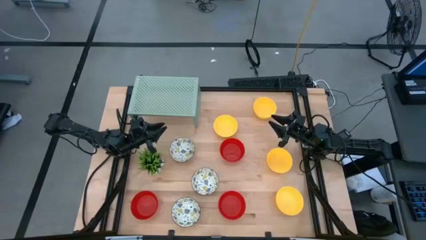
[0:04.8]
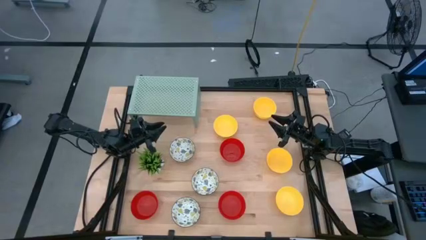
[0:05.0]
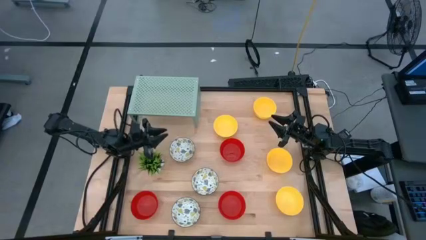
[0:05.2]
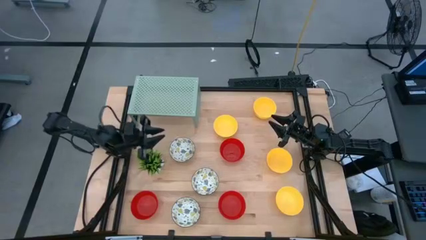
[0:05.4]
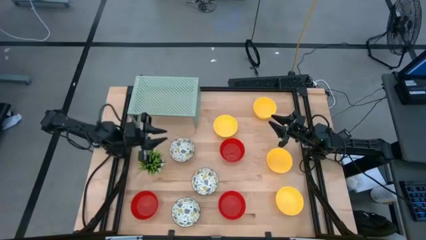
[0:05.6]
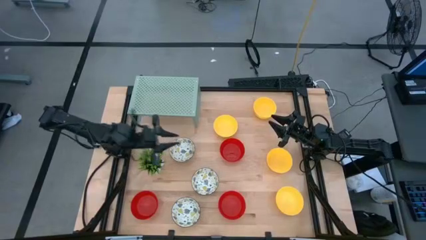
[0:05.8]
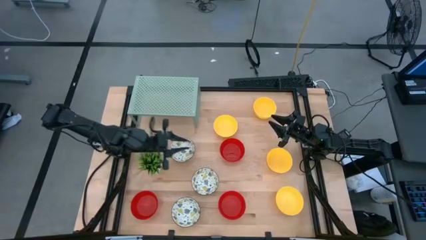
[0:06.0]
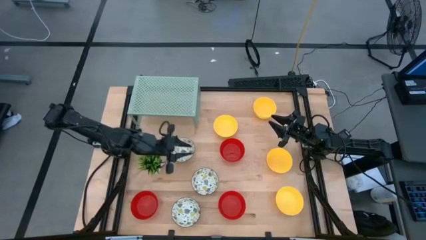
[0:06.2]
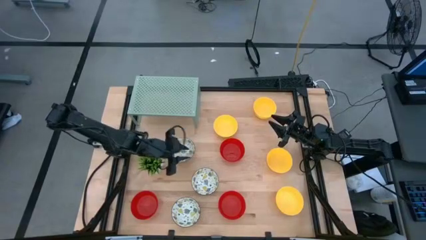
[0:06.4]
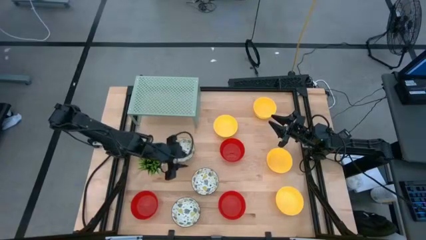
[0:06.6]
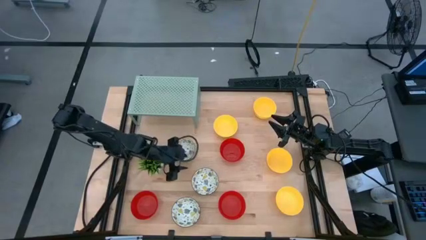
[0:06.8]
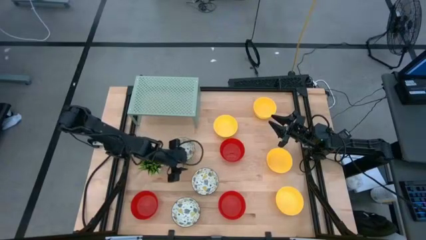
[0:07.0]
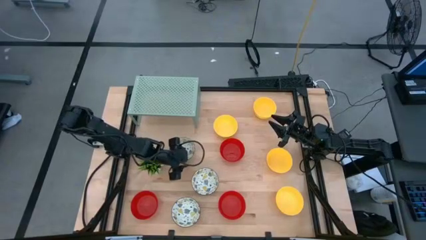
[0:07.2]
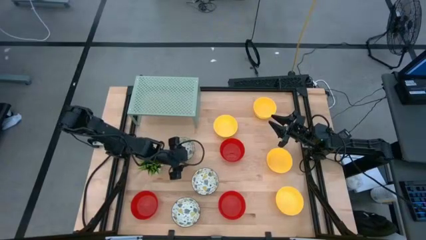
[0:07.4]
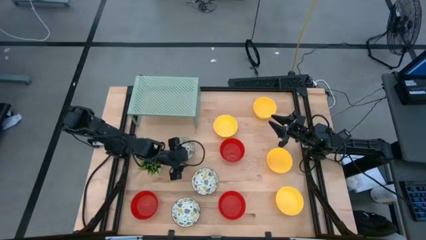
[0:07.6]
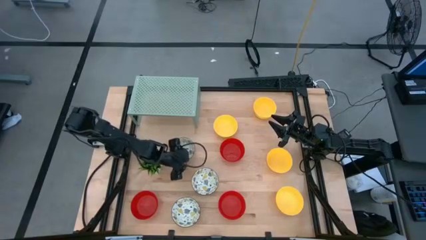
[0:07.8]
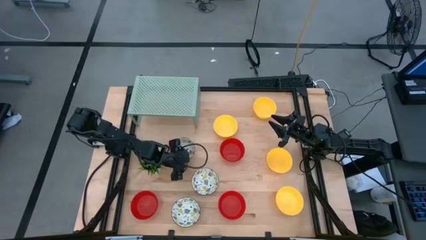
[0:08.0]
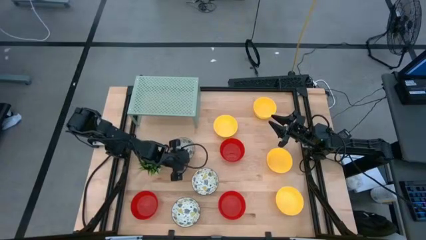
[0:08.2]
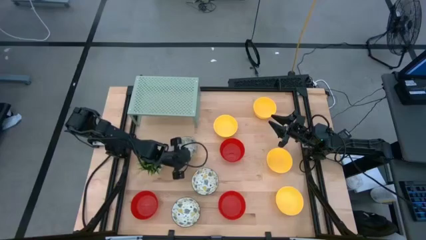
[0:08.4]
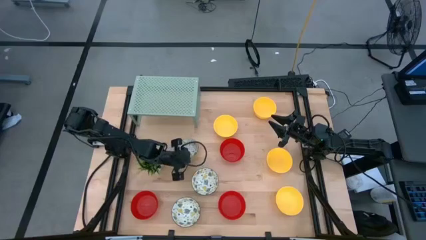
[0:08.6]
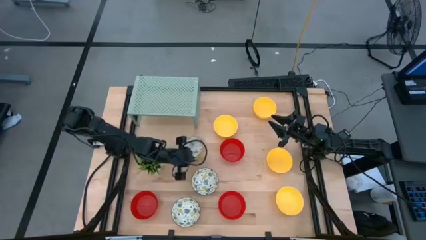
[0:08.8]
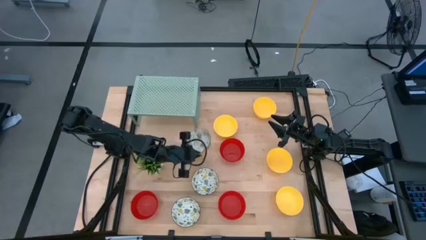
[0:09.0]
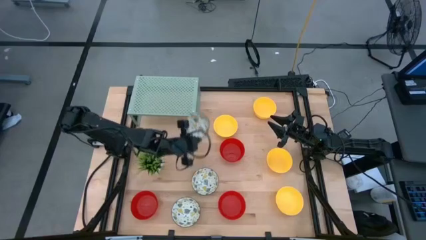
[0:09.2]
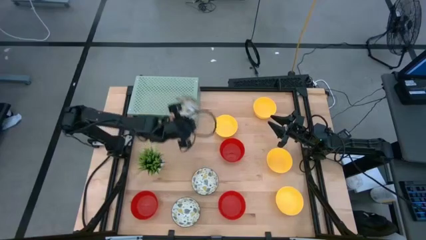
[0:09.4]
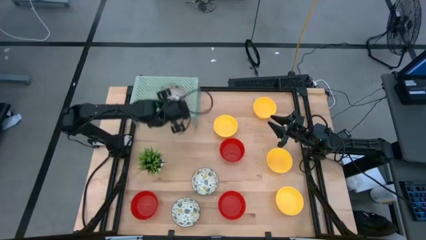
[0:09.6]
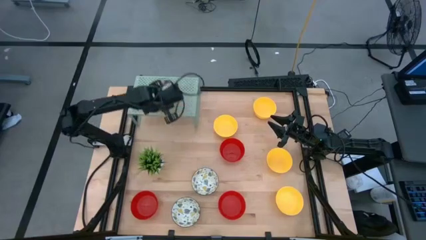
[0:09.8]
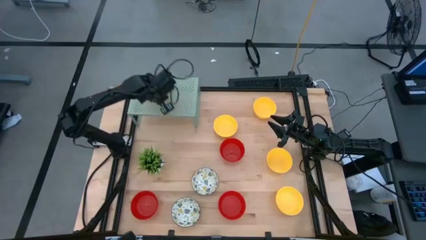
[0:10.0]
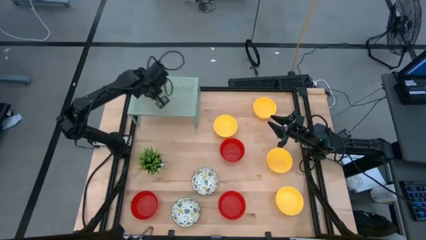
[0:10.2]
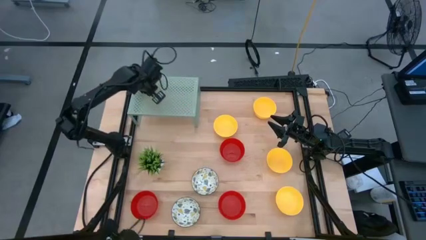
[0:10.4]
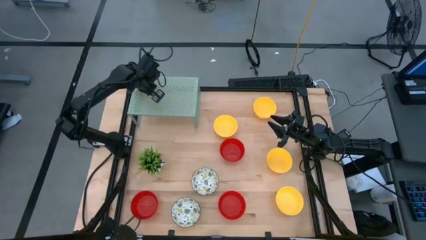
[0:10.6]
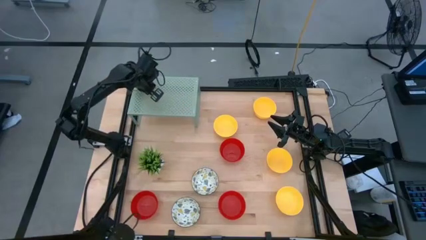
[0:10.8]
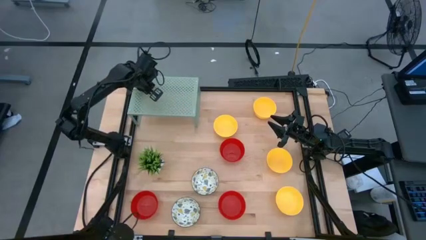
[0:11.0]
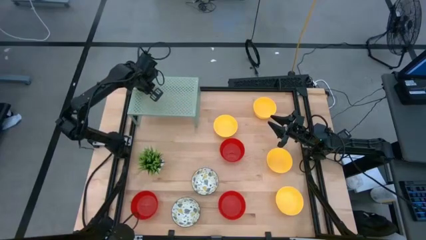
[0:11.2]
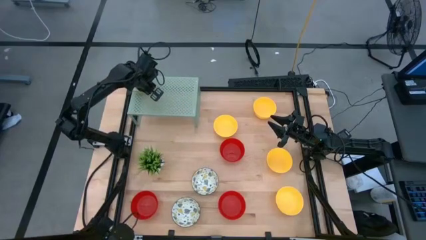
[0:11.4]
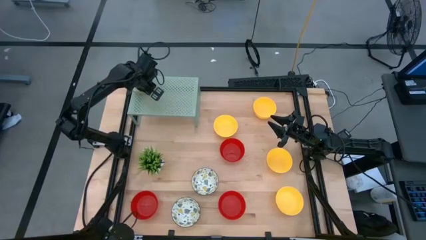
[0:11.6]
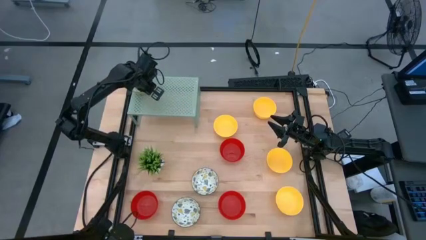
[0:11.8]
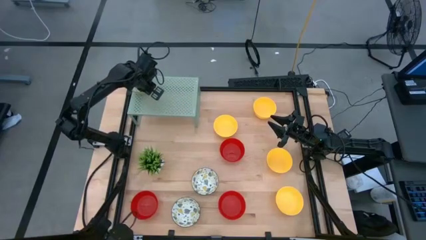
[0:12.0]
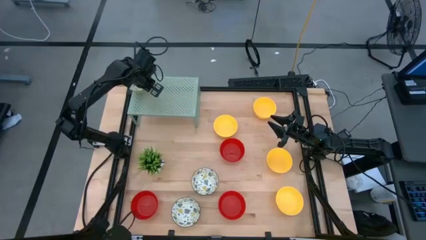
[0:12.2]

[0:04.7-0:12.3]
Task: Pick & Place Mini bowls
Put the white patterned bowl on the shelf

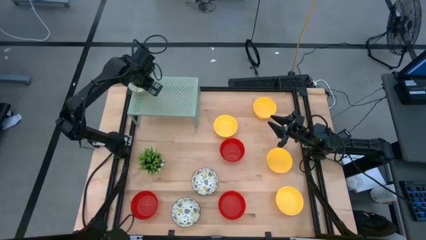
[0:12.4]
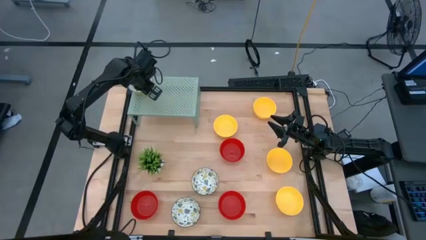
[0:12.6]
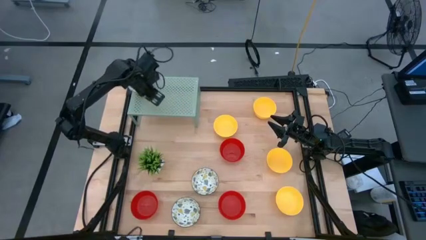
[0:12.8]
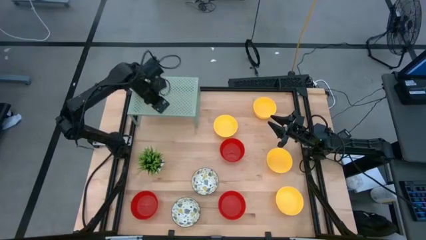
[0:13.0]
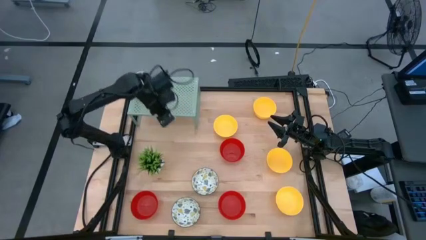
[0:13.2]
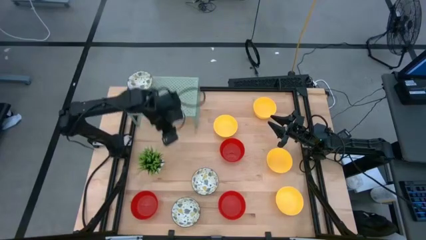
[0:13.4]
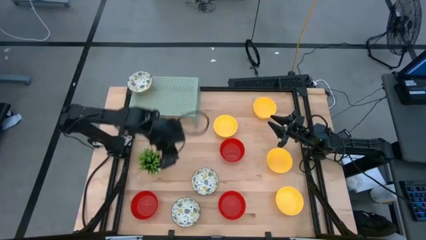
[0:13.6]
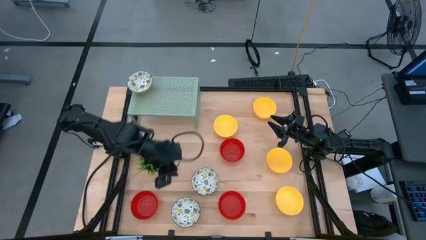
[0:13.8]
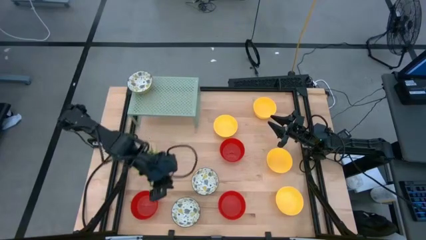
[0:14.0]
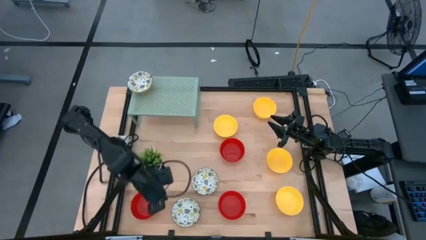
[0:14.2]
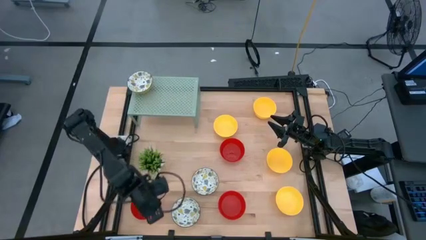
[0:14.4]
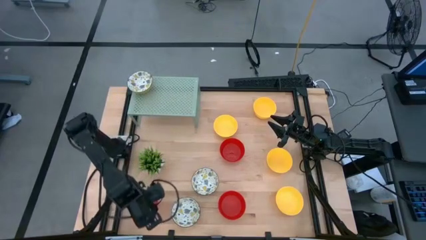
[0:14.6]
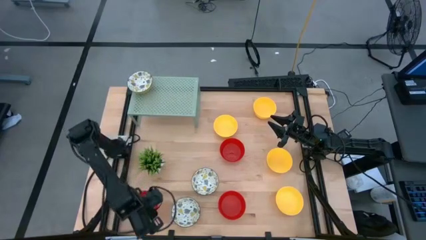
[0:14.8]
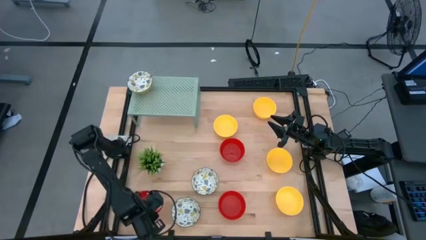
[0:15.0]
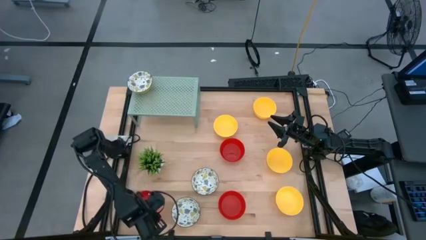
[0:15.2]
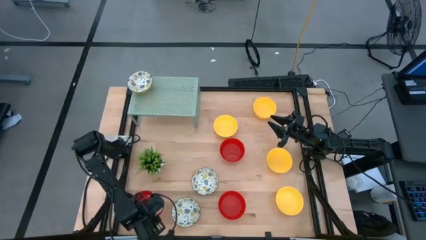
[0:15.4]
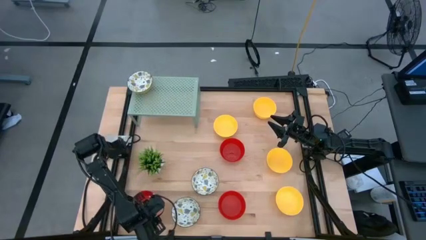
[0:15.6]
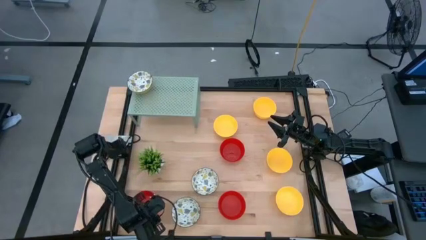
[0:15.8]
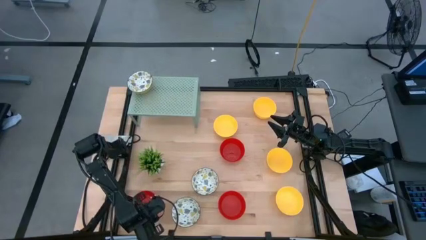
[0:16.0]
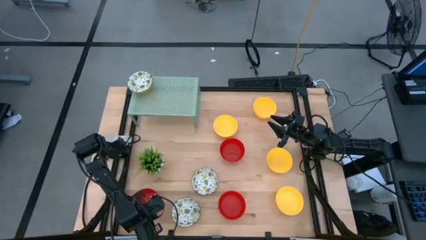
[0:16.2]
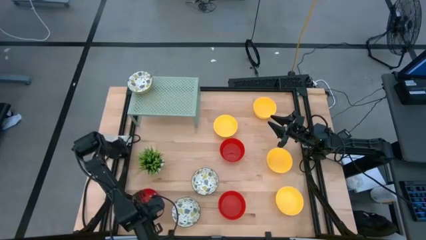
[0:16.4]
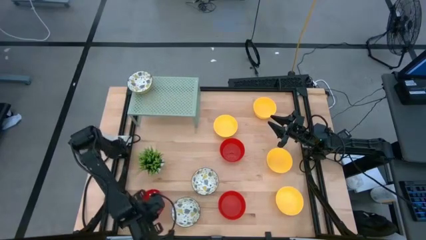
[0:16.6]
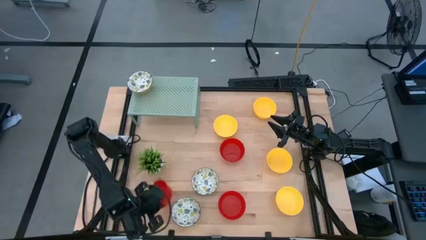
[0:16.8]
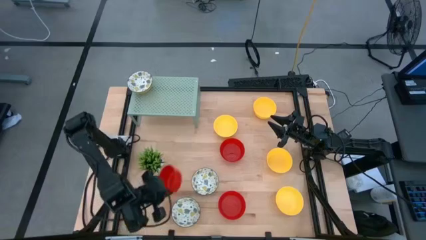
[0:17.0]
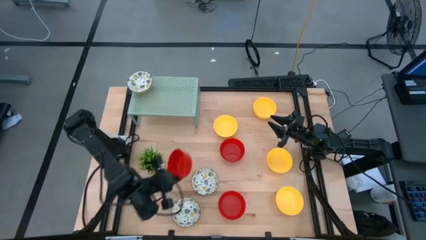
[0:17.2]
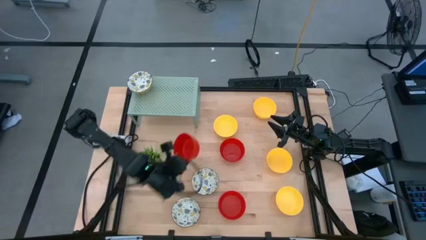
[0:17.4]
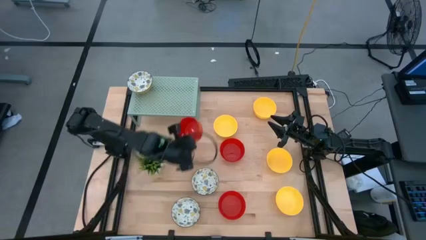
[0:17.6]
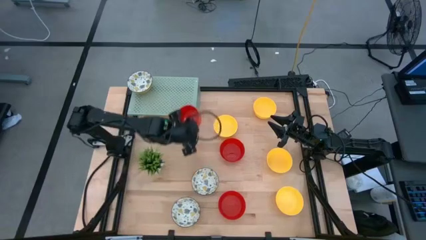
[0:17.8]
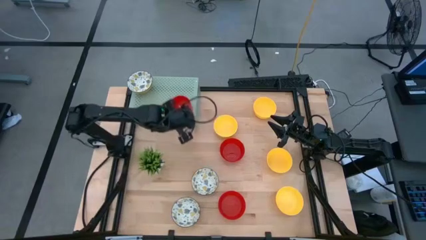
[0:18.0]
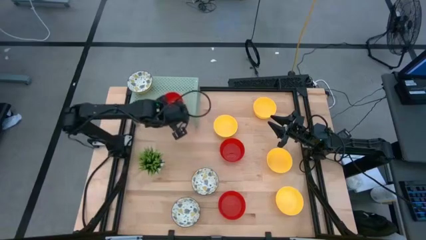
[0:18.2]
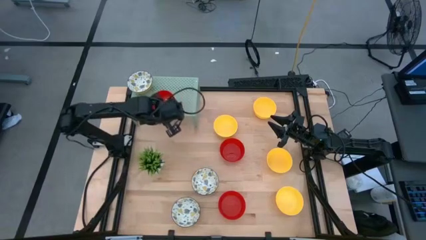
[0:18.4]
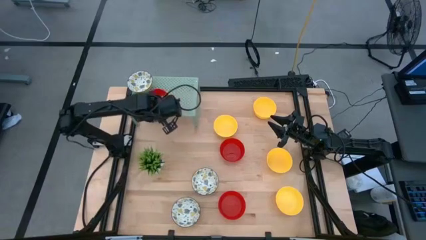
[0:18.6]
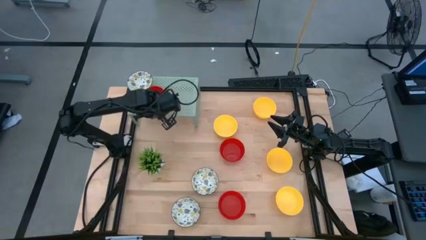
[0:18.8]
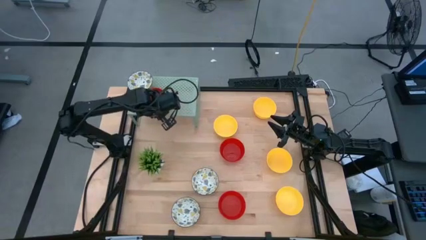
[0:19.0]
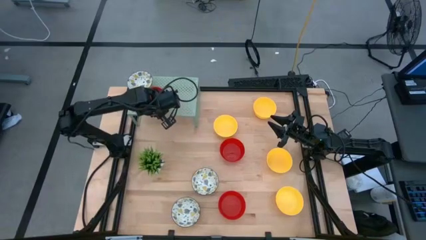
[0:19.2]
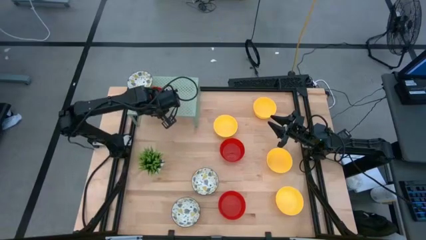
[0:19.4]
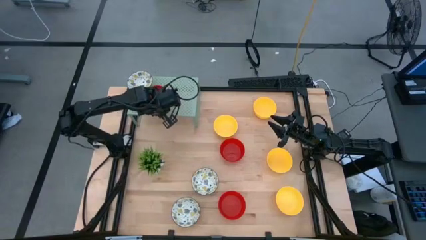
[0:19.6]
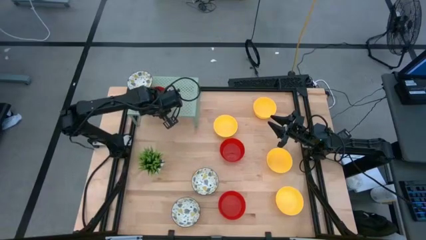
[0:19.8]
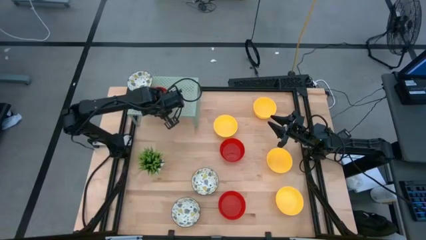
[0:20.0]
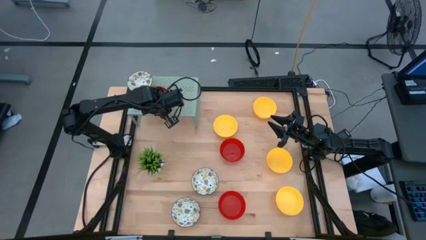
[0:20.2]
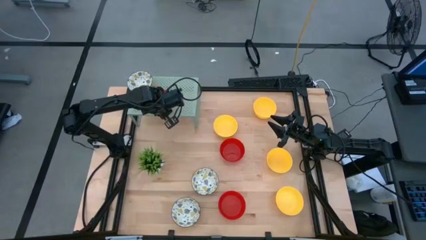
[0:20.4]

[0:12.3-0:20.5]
Put the red bowl on the shelf

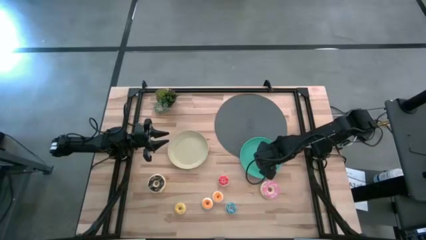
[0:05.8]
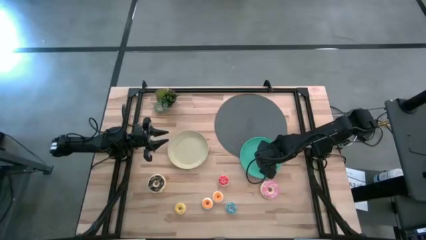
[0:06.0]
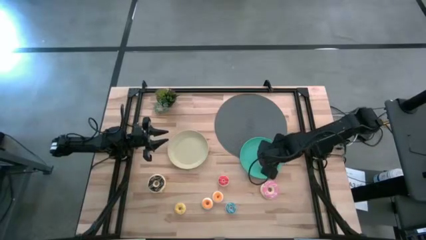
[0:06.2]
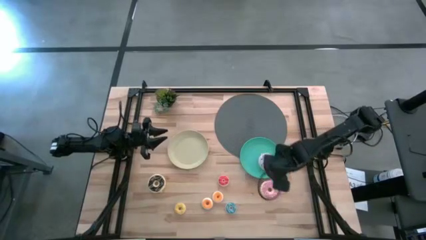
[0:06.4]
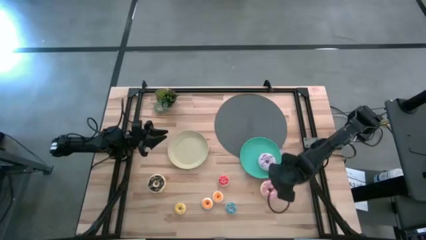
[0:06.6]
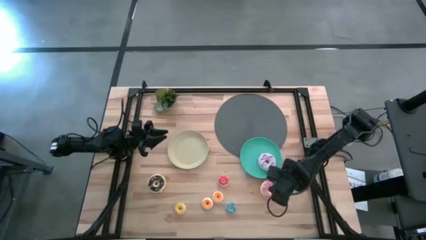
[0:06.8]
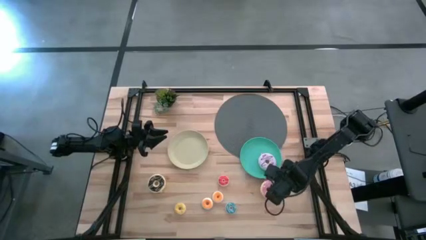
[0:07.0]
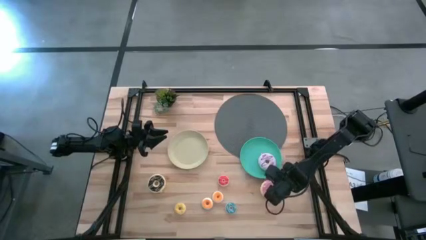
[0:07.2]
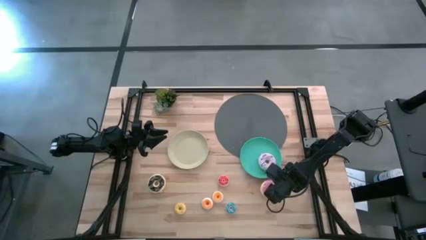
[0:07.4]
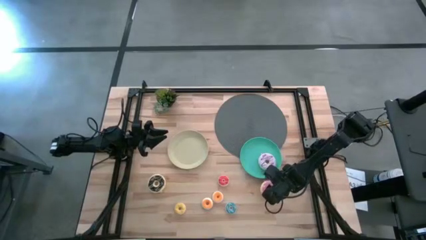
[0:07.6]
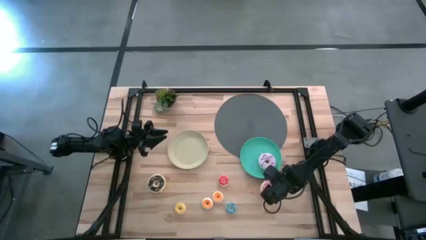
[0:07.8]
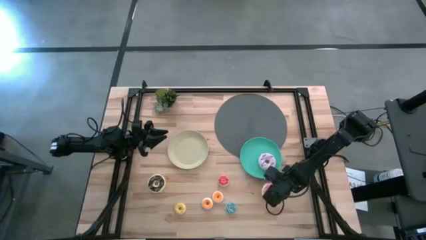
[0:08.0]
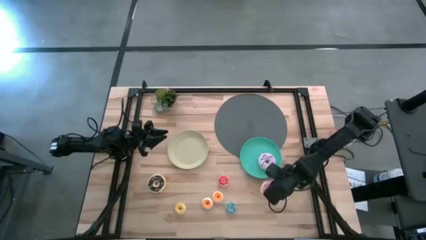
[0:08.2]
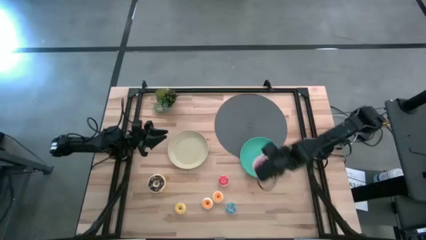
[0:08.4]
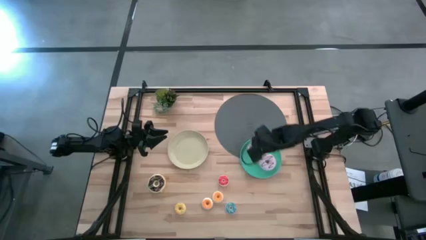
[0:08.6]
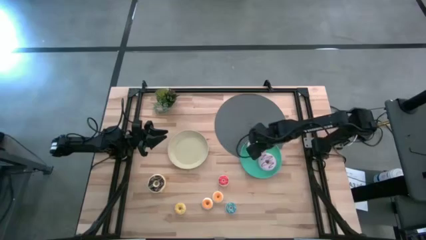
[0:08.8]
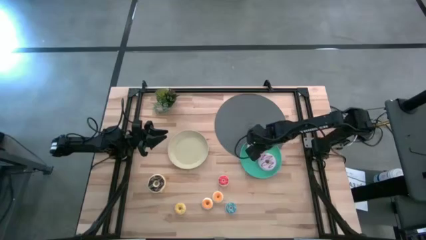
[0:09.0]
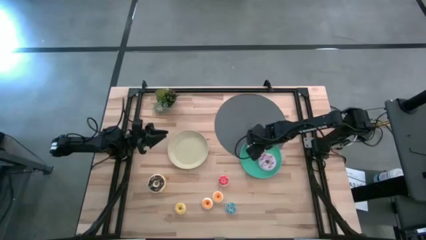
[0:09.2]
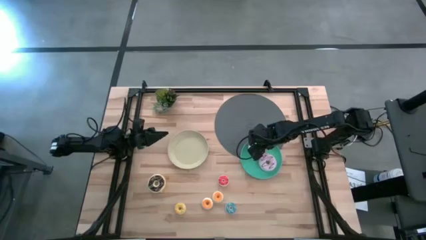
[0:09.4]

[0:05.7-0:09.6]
Task: Pick & Place donuts
Put the large pink donut on the green plate
